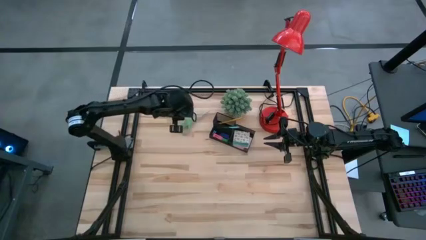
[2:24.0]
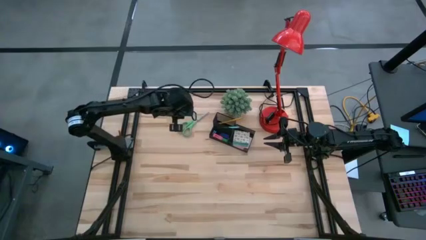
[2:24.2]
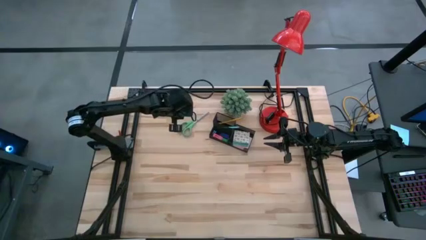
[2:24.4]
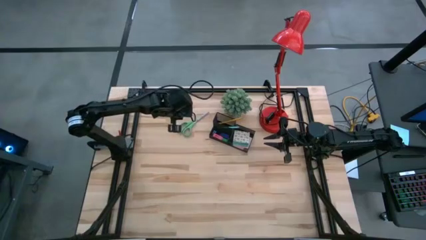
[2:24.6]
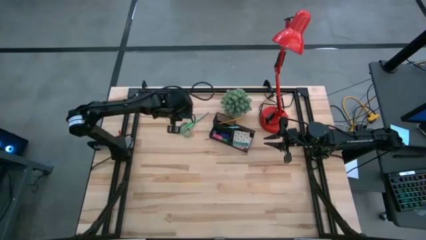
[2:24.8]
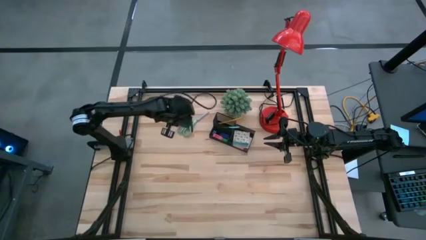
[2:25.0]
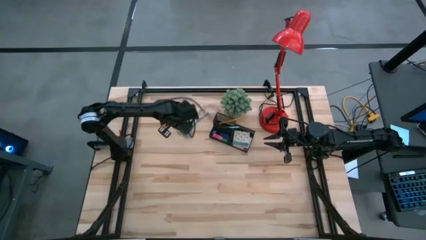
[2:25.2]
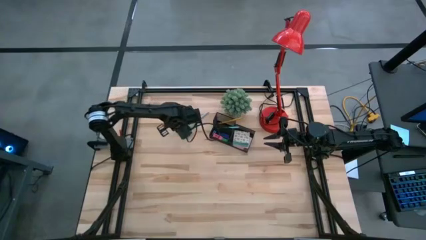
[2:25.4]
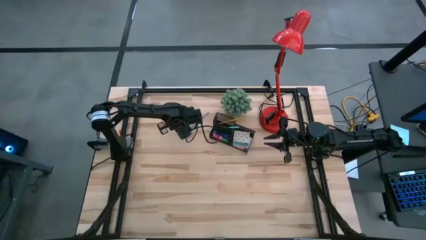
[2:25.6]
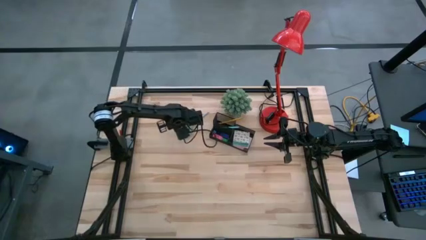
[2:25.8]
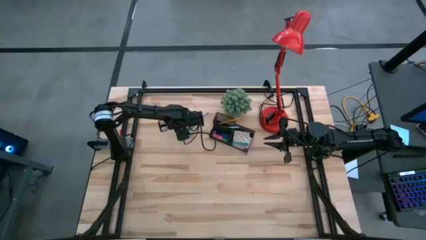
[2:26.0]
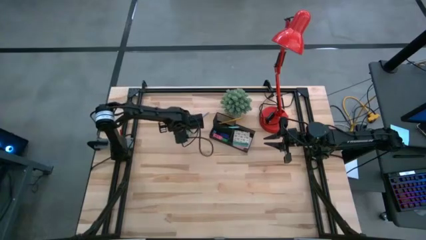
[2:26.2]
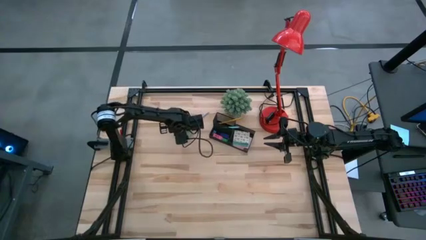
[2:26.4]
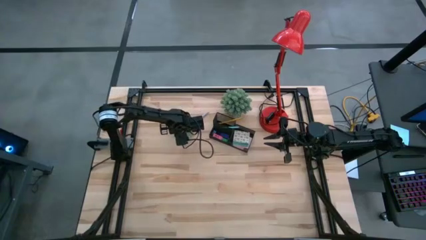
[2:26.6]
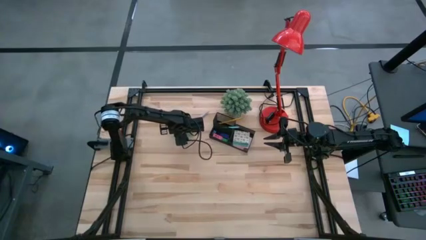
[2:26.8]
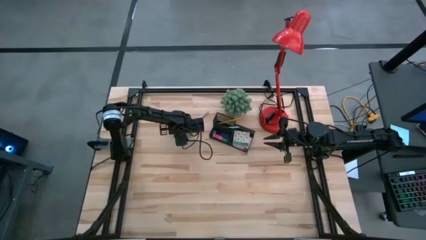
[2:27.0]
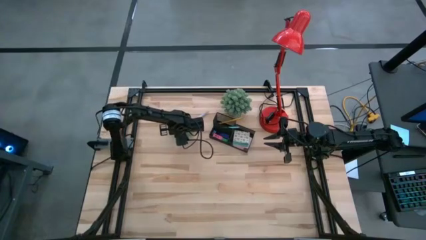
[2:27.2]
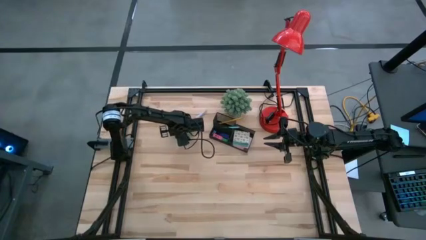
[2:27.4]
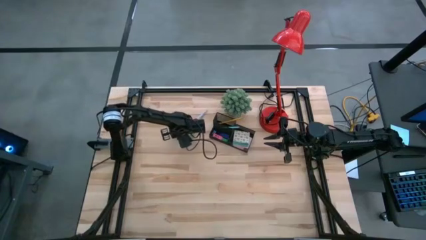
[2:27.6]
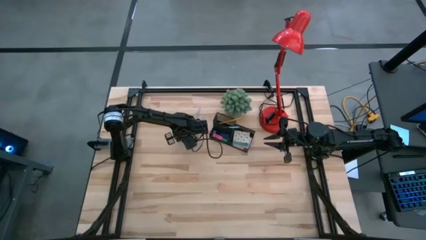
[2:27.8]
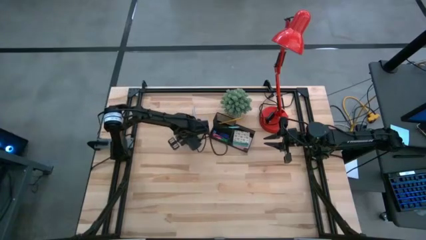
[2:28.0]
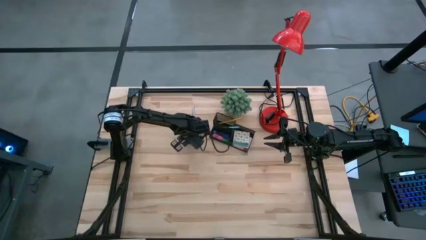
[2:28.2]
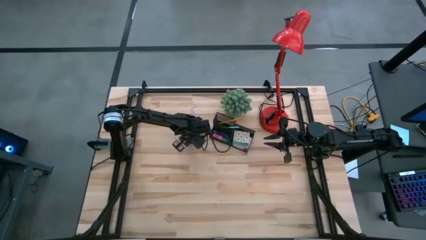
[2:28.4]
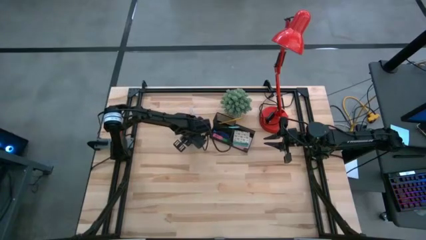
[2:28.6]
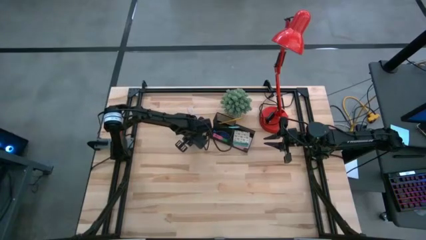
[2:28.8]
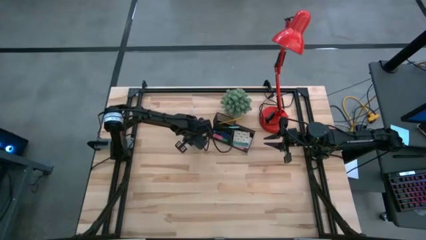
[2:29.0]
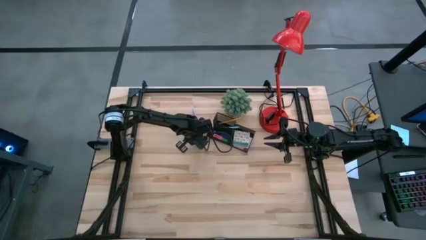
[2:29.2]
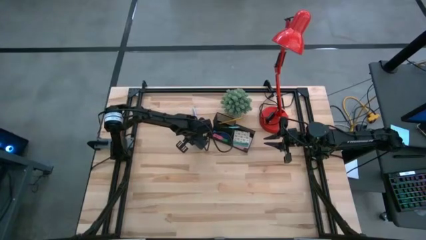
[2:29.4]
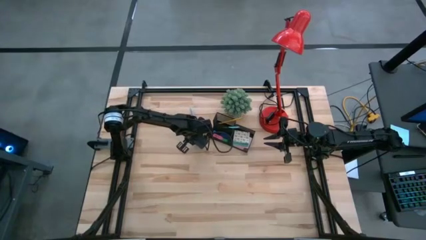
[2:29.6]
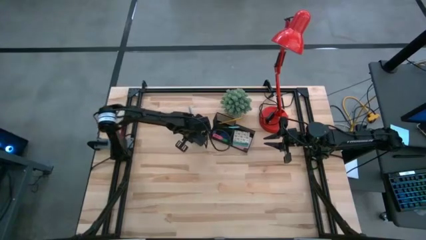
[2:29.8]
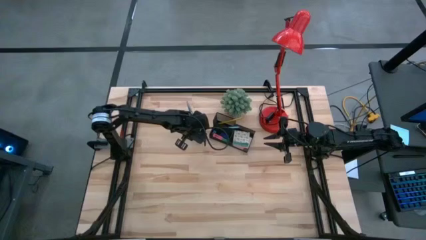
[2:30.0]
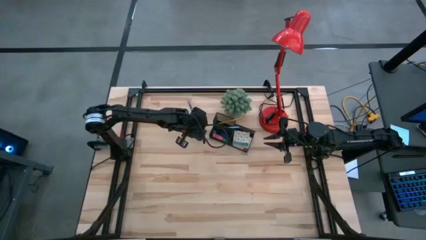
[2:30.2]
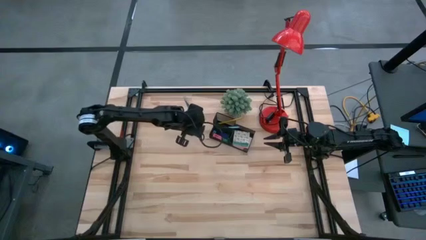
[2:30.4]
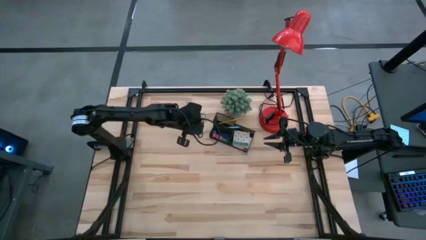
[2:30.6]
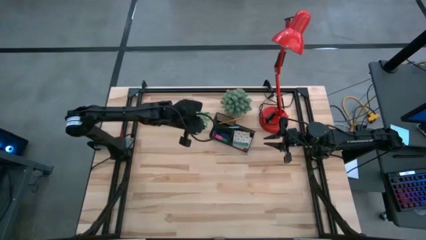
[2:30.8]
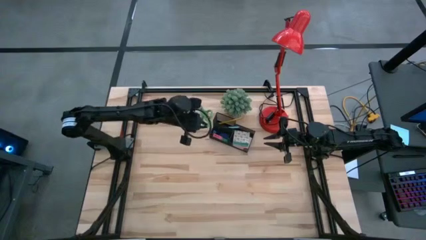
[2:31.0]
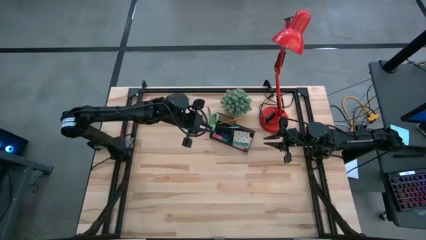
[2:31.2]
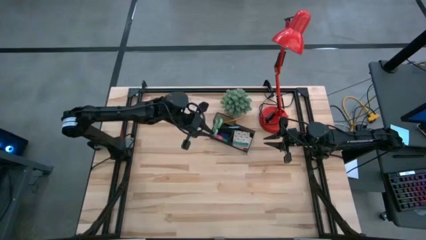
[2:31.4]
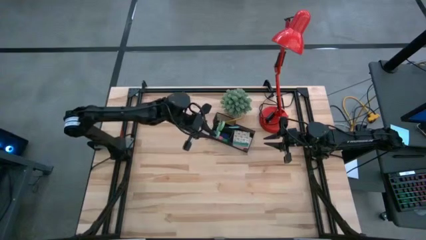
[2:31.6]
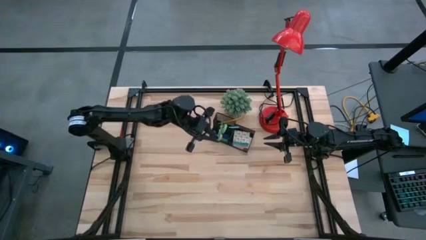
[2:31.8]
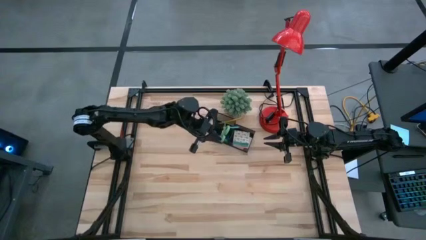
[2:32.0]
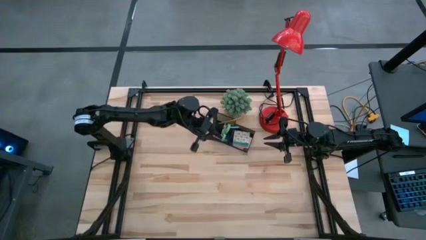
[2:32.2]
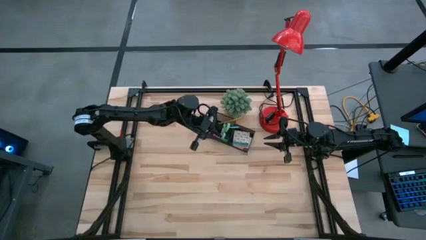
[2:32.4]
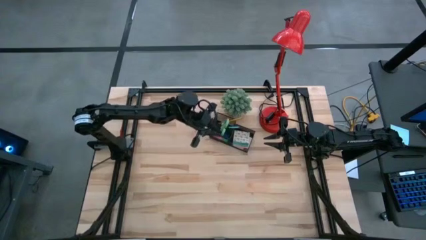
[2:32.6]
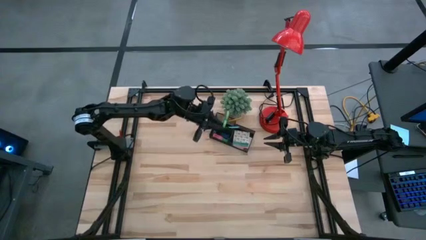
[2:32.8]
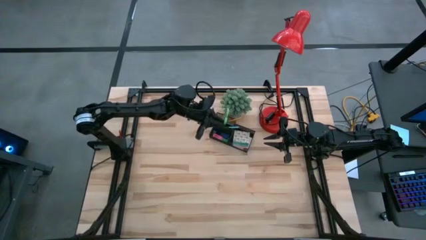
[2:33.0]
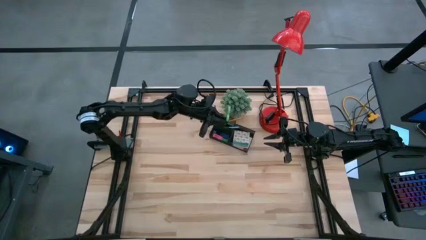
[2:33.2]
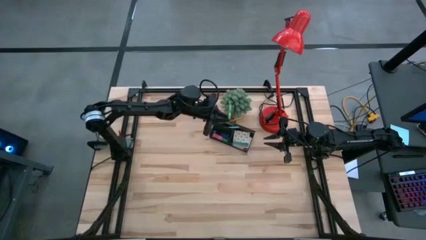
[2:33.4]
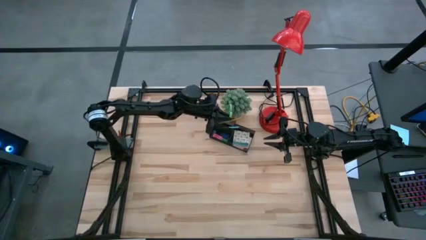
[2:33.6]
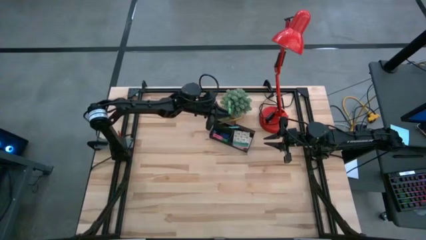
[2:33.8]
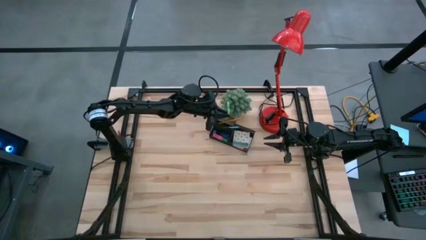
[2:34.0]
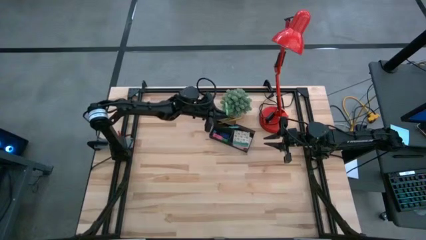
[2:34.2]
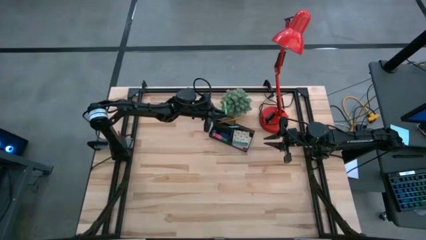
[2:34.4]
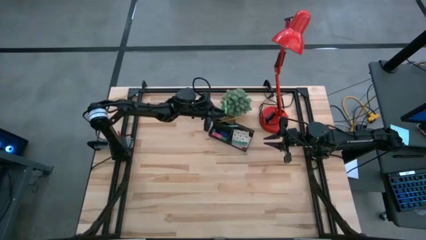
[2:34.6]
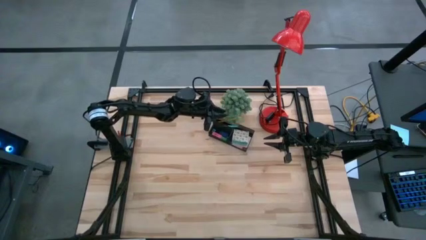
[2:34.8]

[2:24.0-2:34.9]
Task: Pick and place office supplies into organizer
Put the green scissors into the black desk organizer
